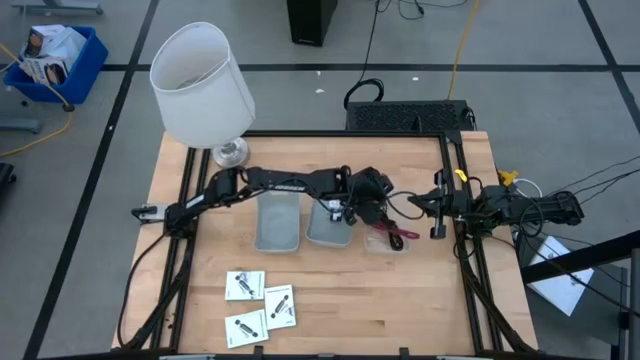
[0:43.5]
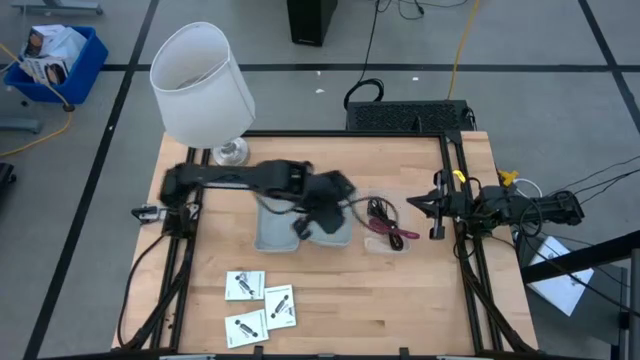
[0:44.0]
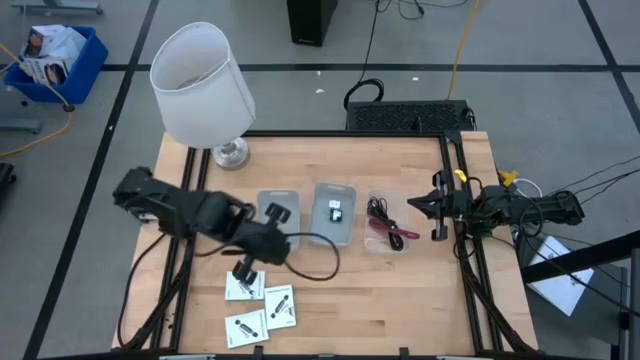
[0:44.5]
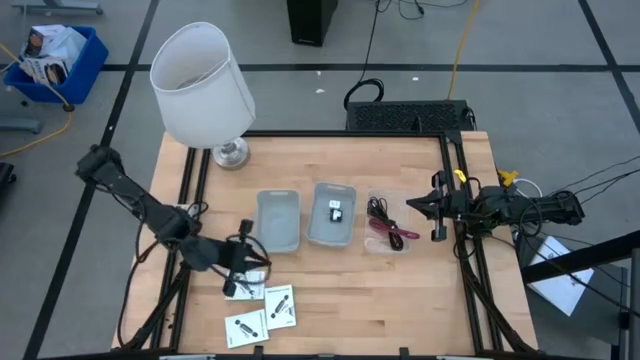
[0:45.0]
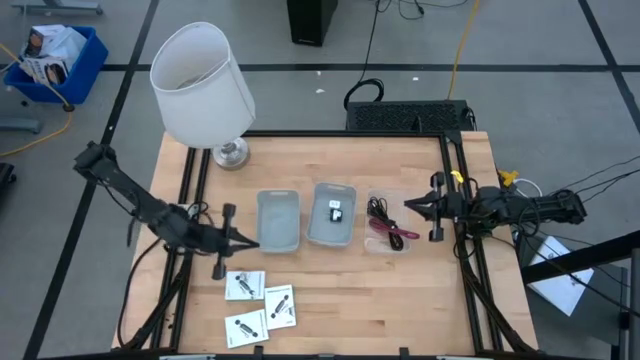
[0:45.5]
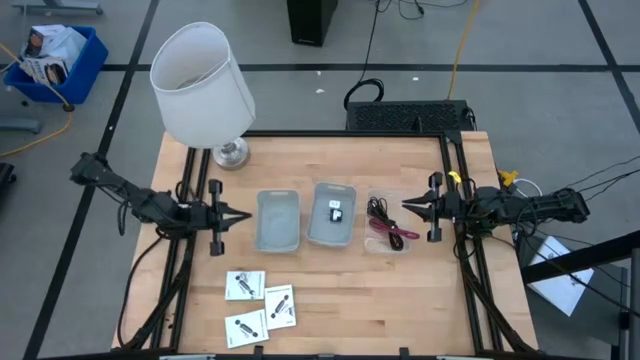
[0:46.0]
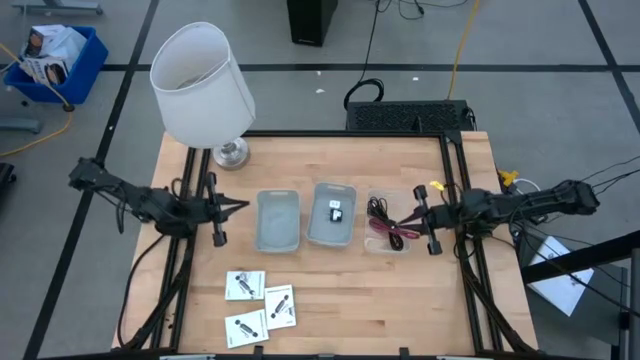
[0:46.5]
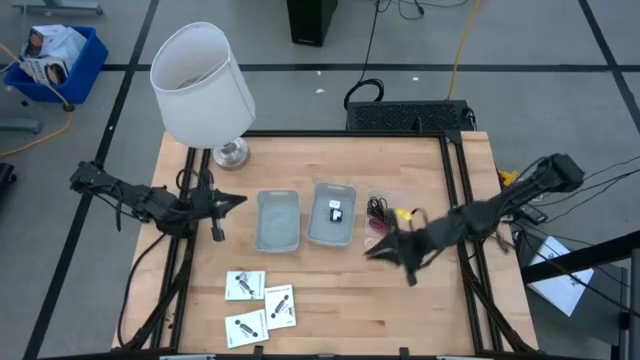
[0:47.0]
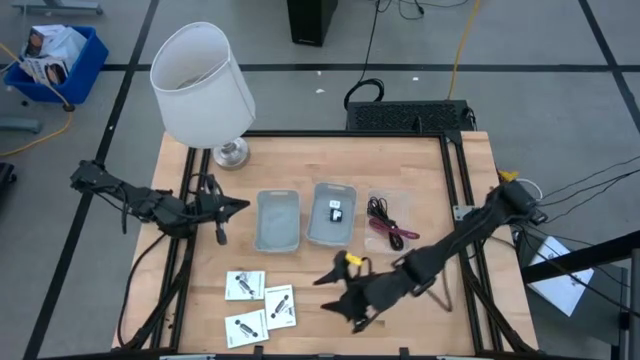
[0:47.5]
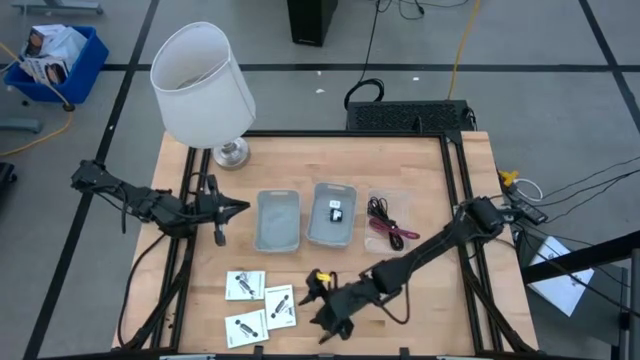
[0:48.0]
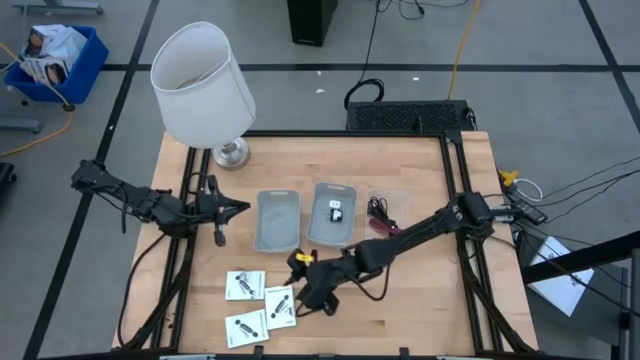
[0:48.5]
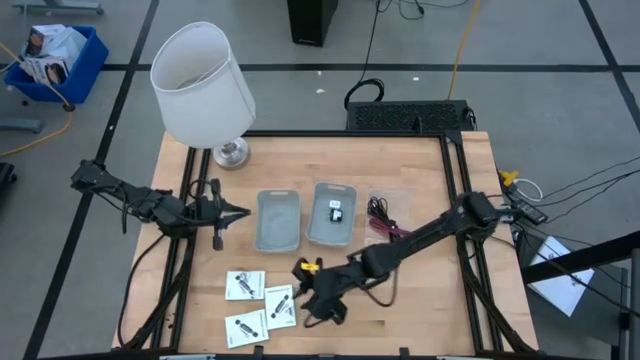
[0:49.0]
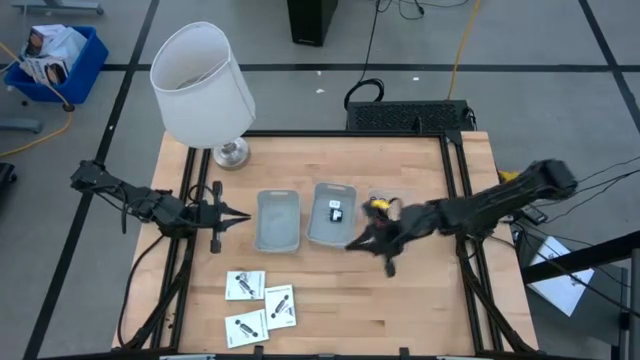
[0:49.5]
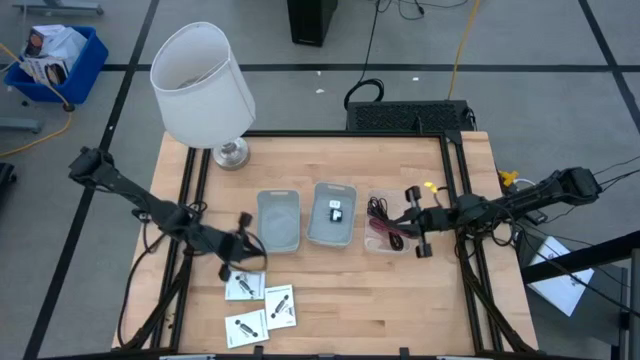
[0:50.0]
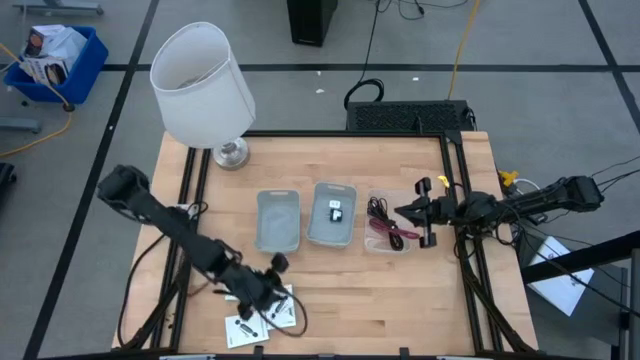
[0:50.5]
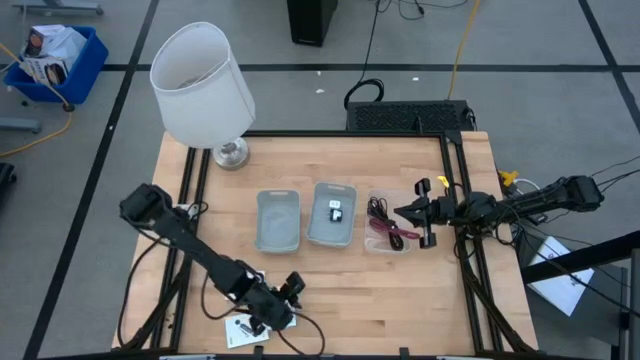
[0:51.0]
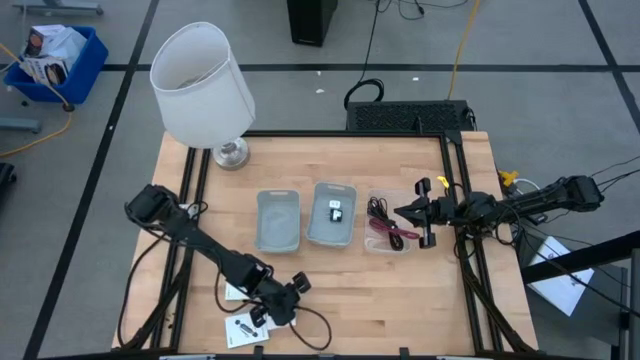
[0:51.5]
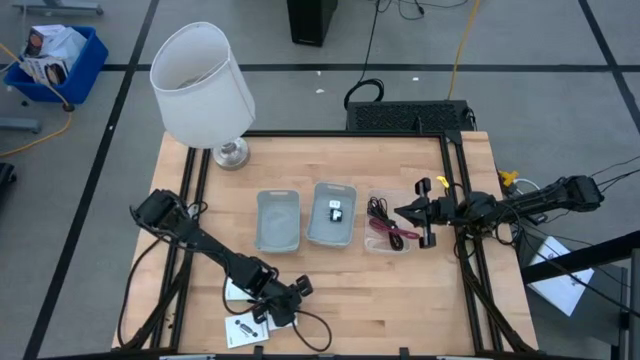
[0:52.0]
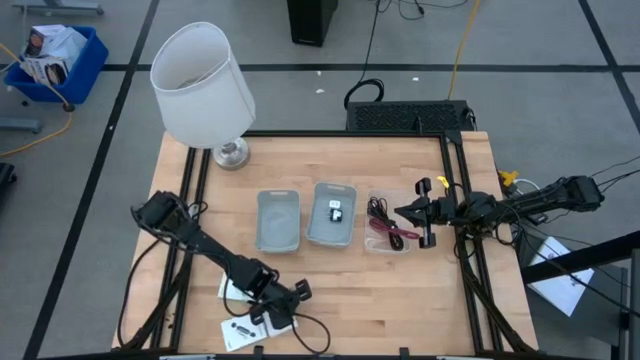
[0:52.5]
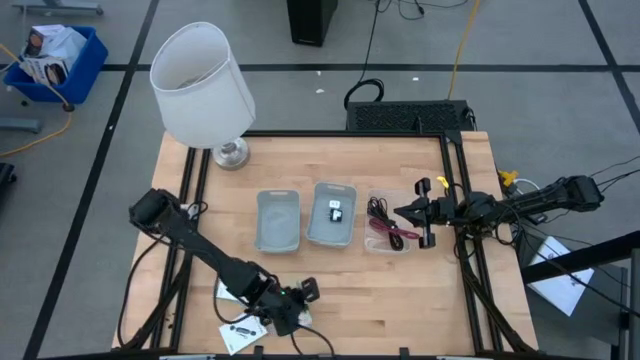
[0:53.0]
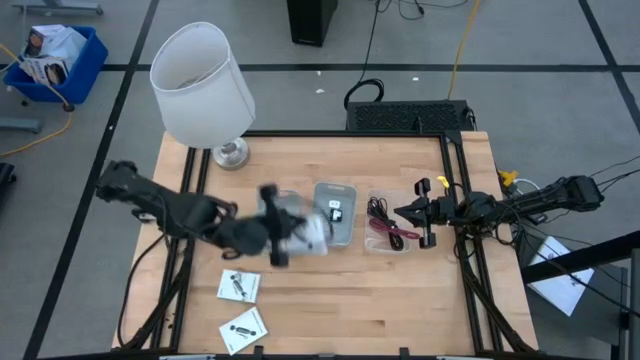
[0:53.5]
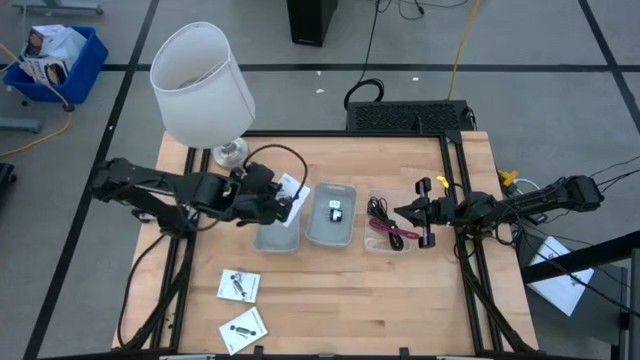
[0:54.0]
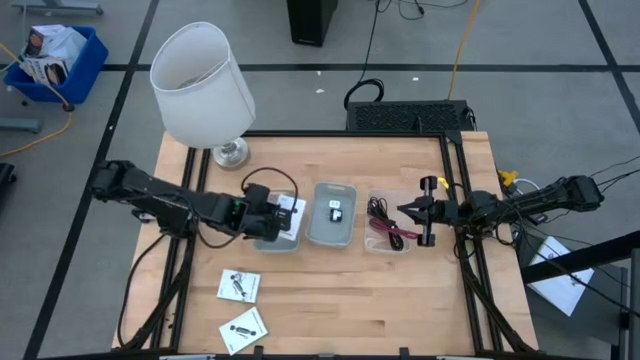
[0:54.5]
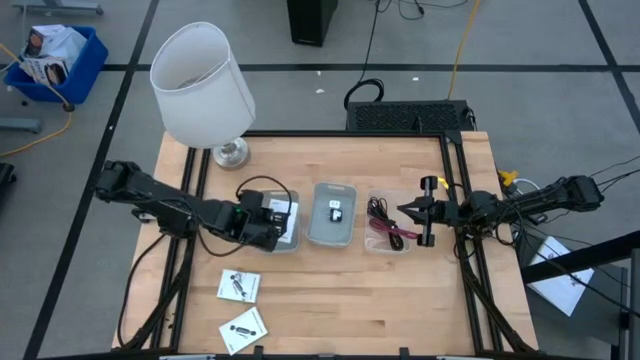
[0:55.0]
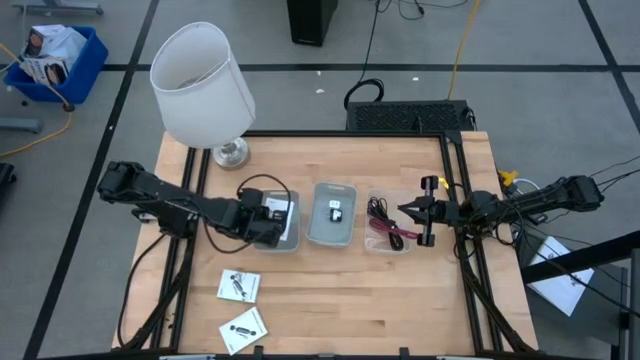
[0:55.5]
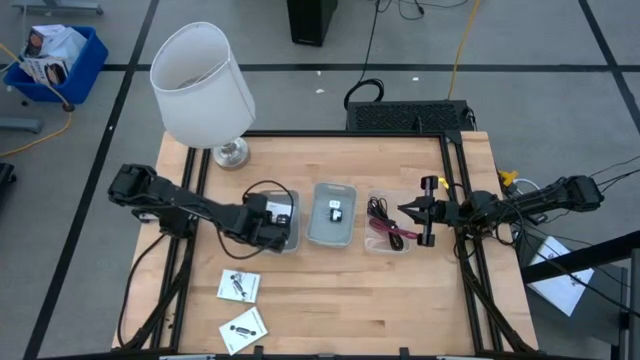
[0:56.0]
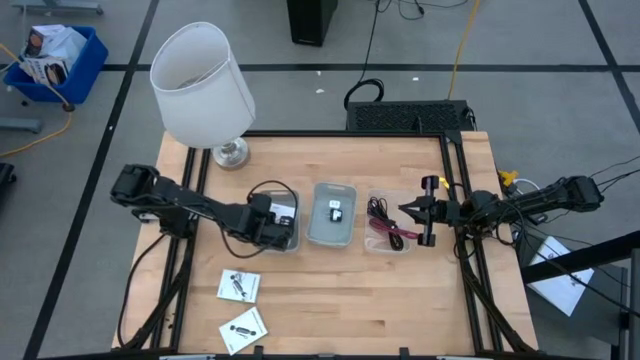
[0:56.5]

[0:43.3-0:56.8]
Task: Pick and place items into bin
Put the right card reader box into the left gray bin

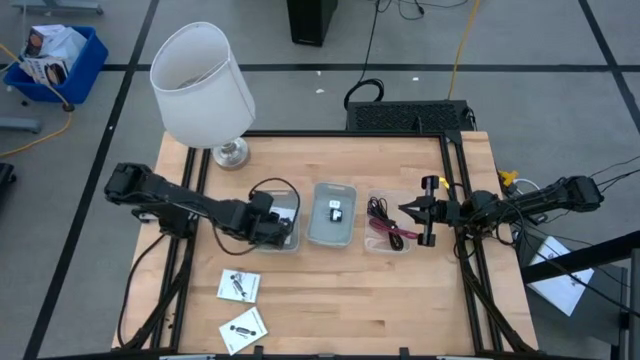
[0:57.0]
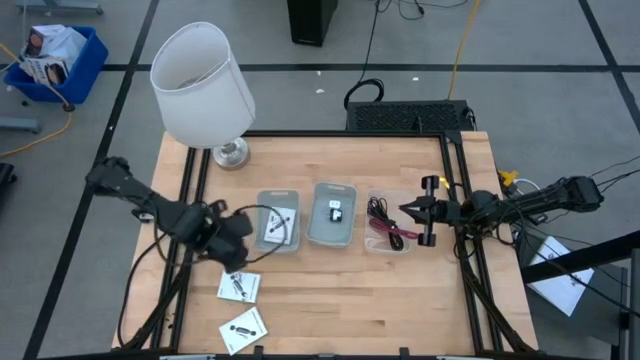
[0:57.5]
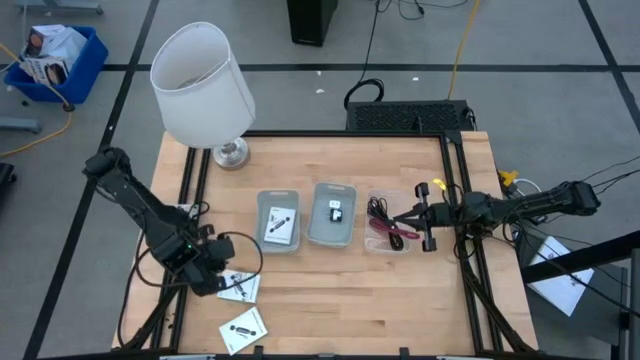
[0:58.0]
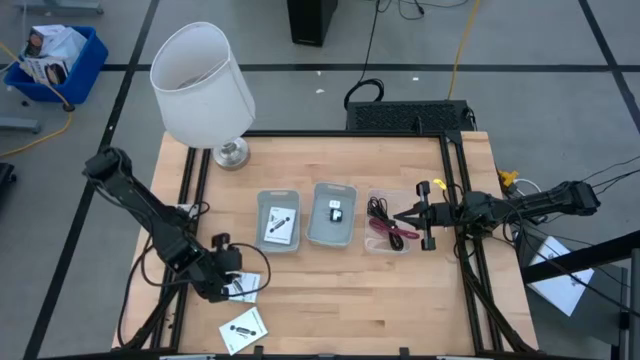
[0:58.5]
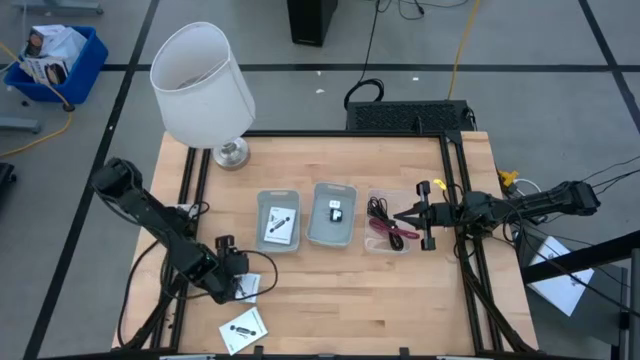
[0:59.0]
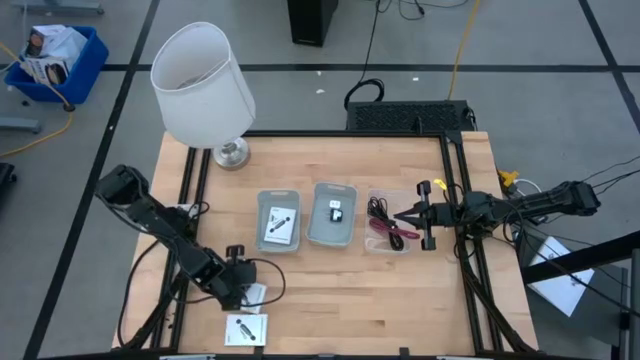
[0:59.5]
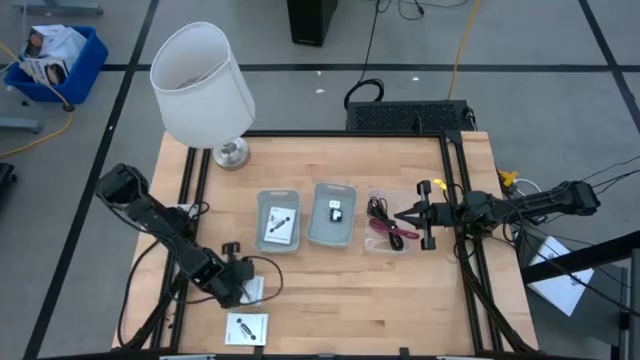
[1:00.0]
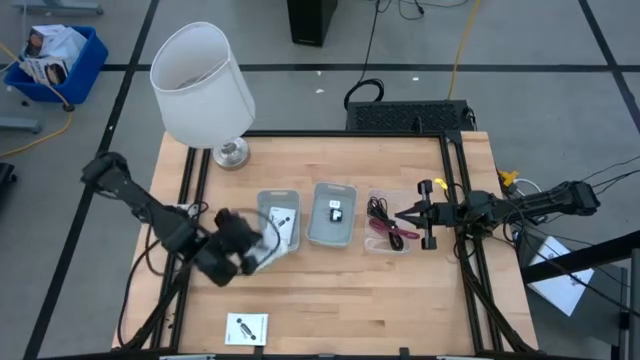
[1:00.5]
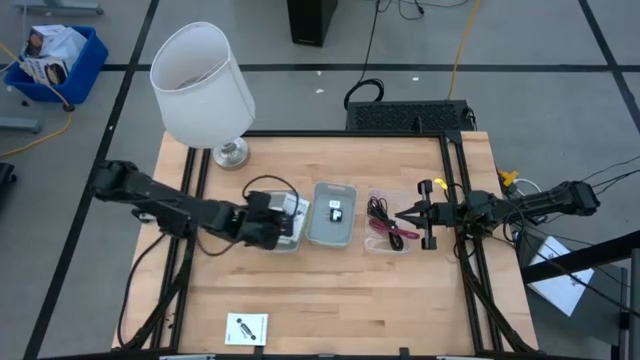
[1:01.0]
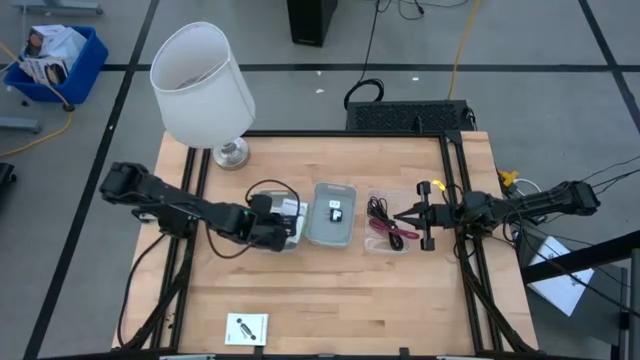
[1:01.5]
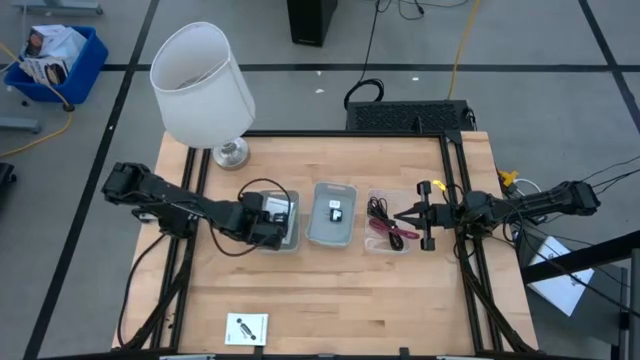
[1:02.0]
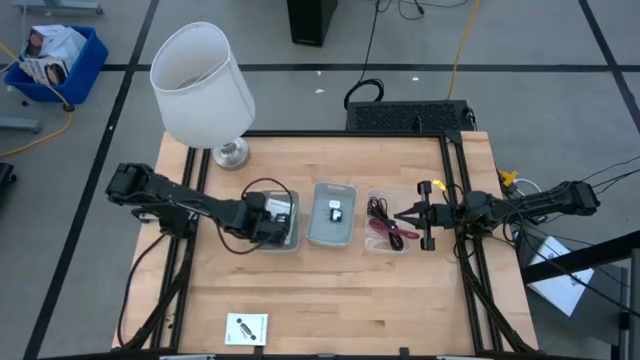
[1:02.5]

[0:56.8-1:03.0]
Put the top card reader box into the left gray bin

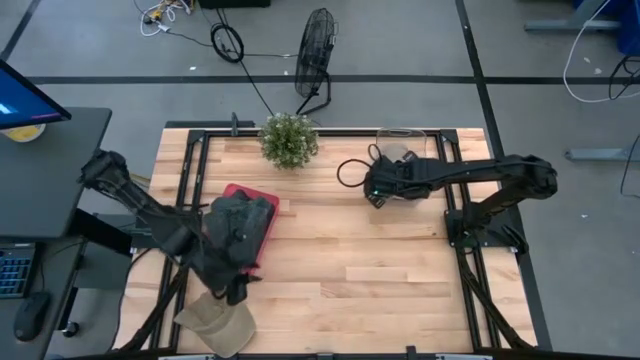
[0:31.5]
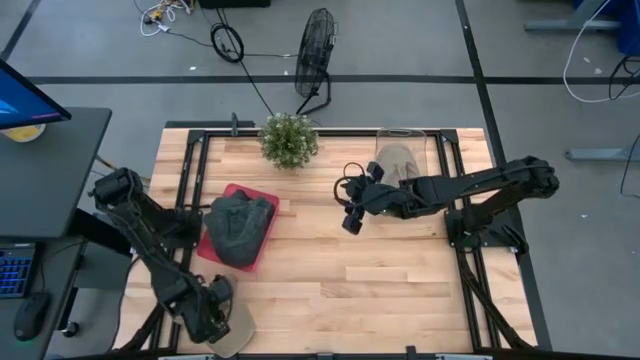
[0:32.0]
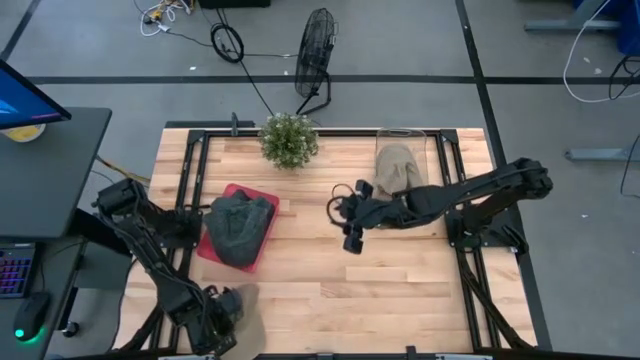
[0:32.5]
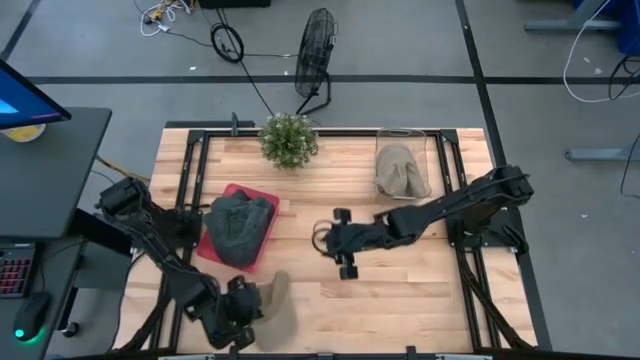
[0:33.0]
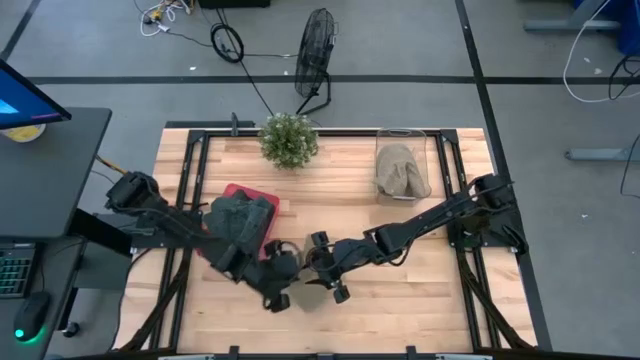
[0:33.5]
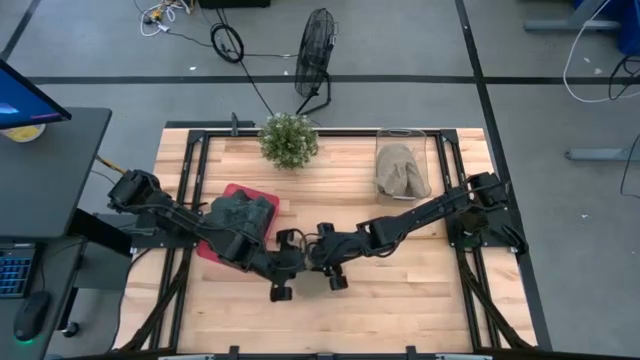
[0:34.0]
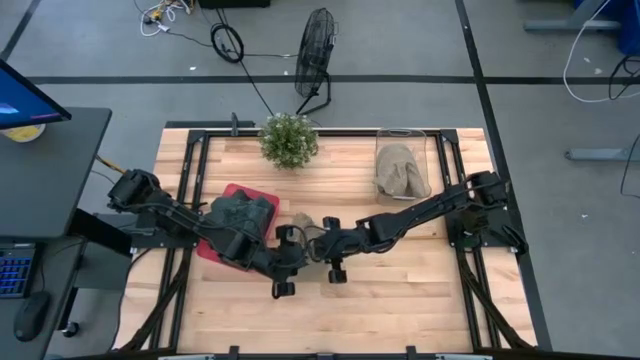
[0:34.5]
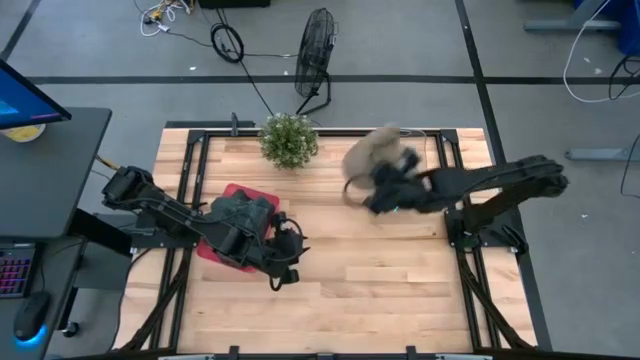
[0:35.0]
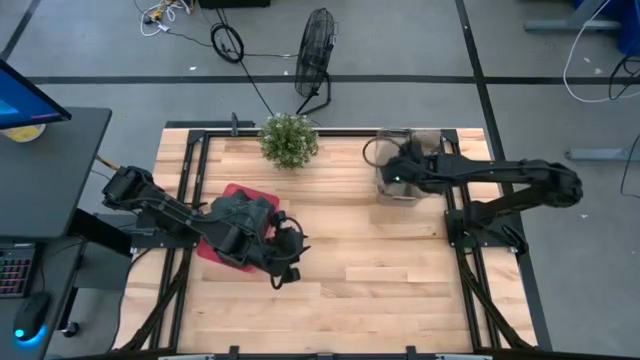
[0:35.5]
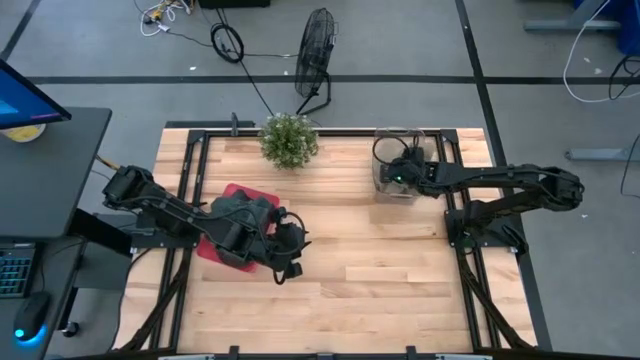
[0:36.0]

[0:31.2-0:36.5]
Task: Pick & Place hat
Put the brown cap into the transparent bin
